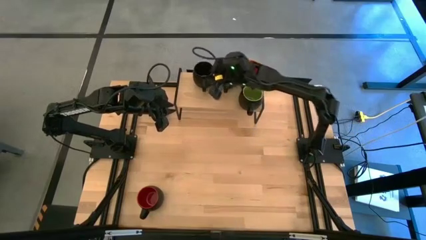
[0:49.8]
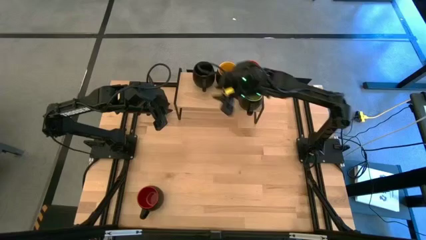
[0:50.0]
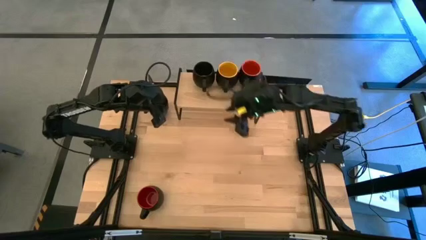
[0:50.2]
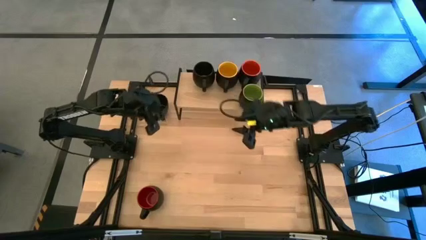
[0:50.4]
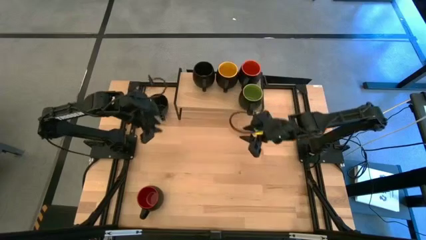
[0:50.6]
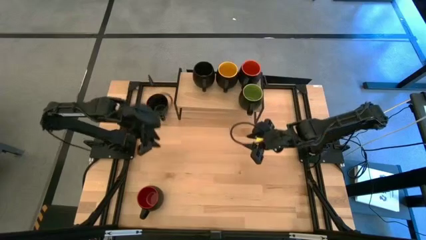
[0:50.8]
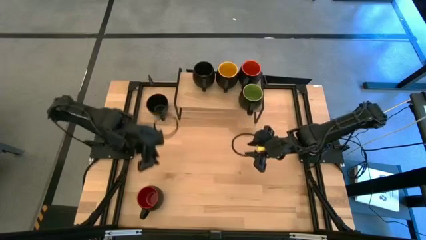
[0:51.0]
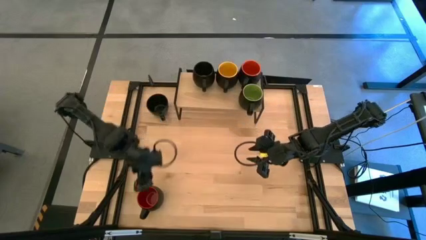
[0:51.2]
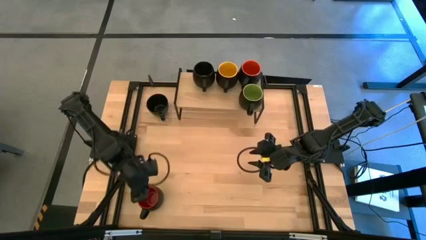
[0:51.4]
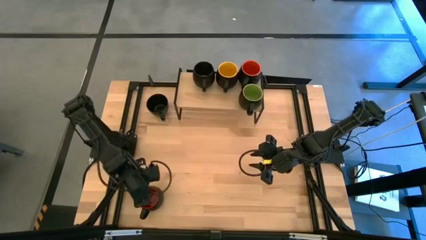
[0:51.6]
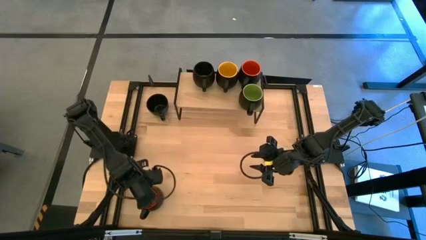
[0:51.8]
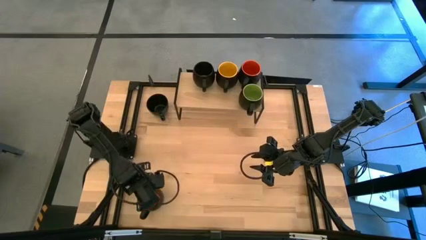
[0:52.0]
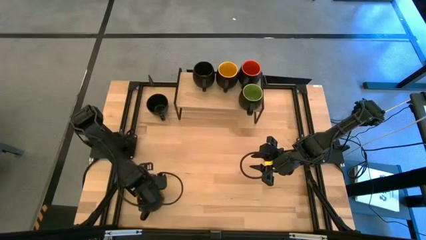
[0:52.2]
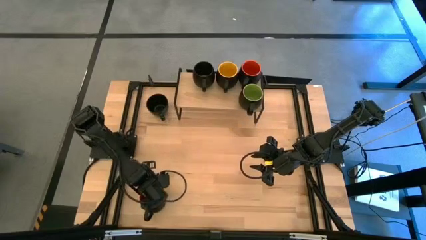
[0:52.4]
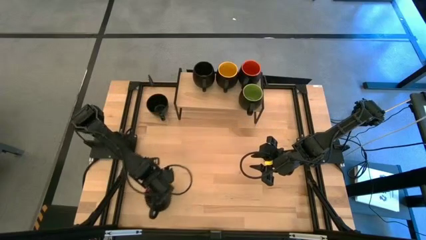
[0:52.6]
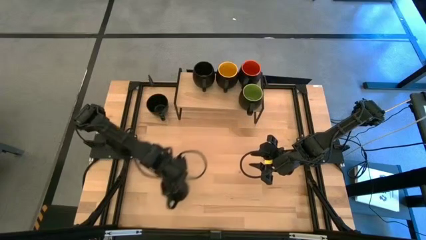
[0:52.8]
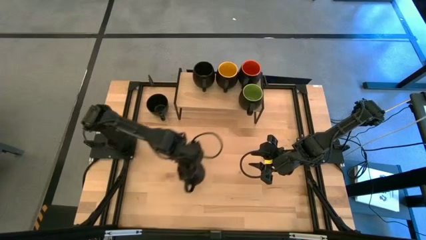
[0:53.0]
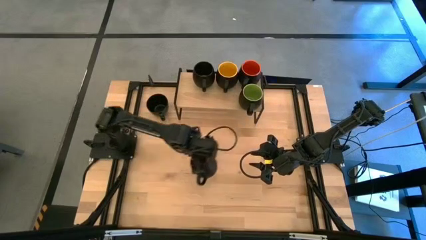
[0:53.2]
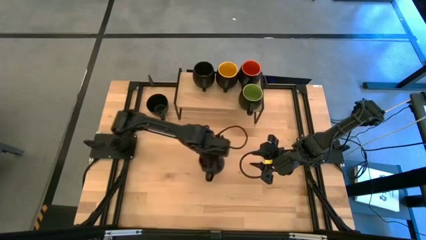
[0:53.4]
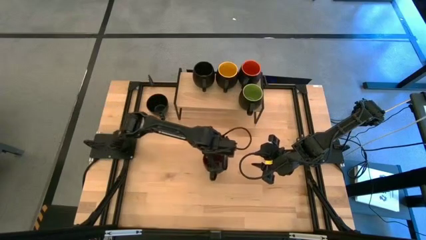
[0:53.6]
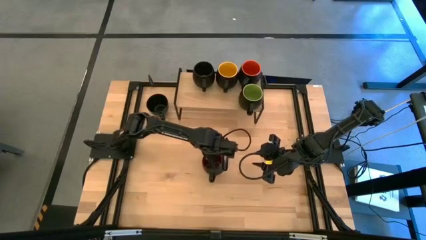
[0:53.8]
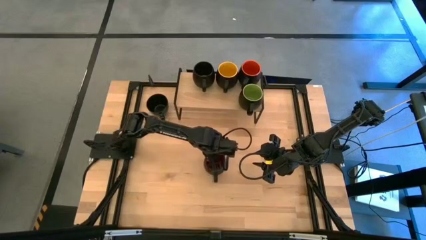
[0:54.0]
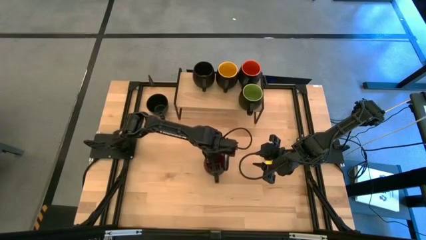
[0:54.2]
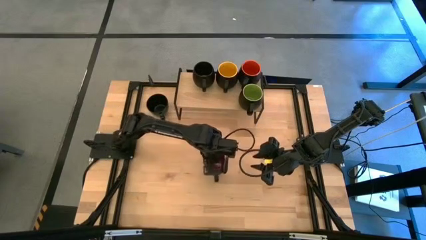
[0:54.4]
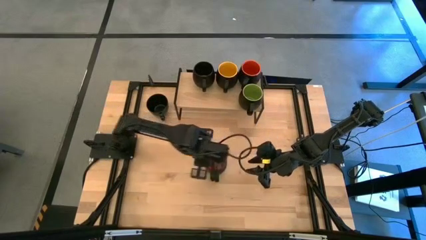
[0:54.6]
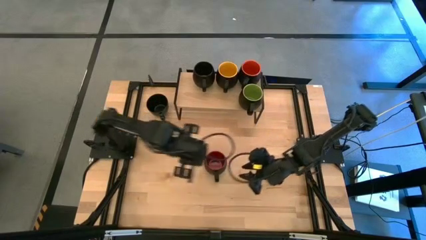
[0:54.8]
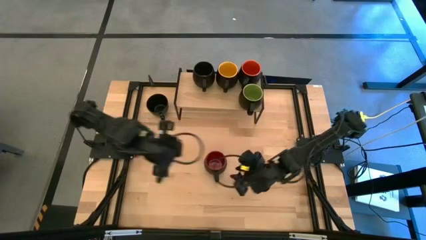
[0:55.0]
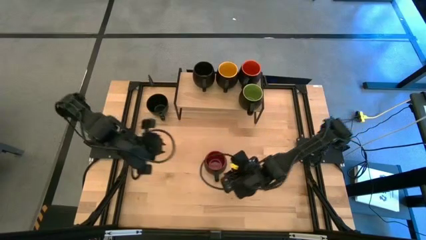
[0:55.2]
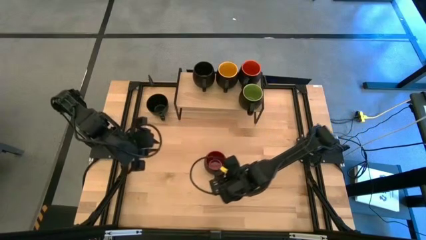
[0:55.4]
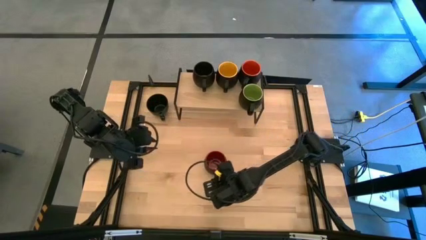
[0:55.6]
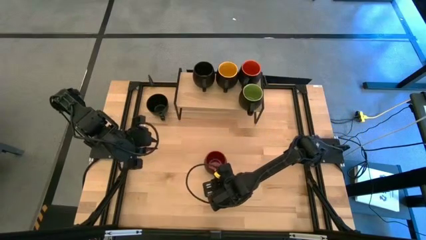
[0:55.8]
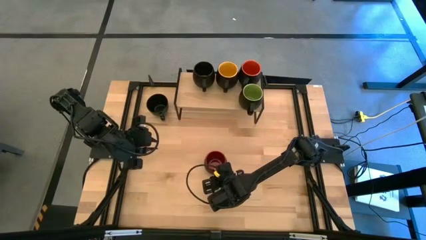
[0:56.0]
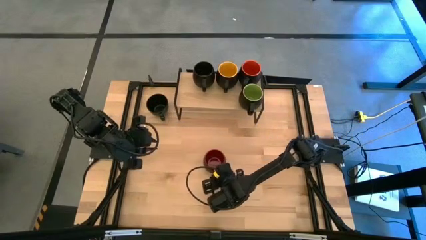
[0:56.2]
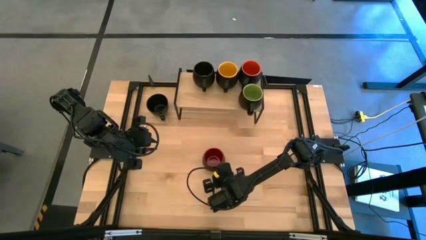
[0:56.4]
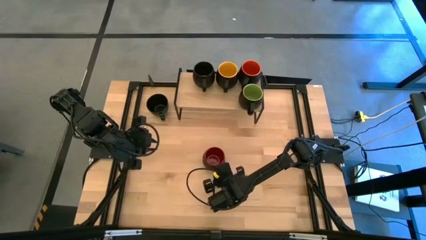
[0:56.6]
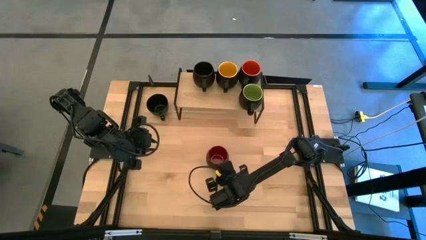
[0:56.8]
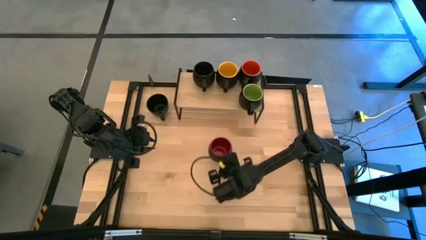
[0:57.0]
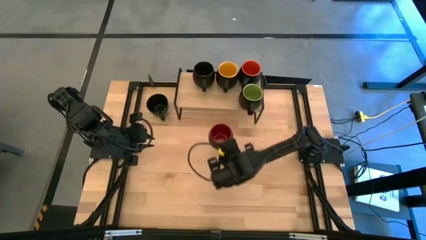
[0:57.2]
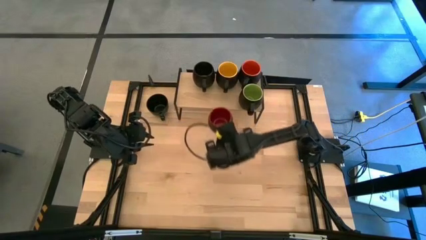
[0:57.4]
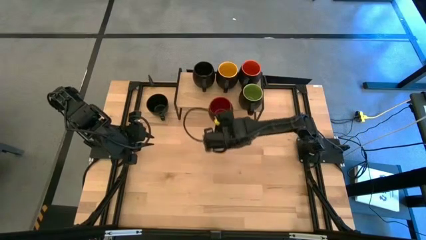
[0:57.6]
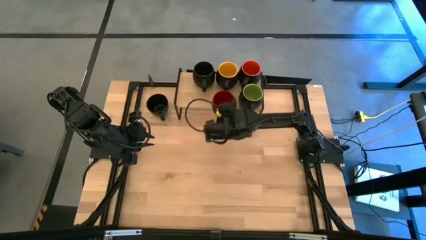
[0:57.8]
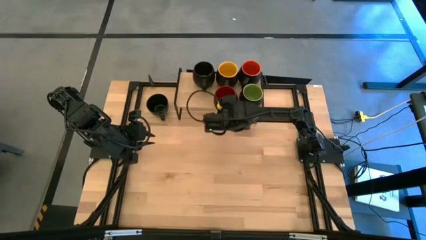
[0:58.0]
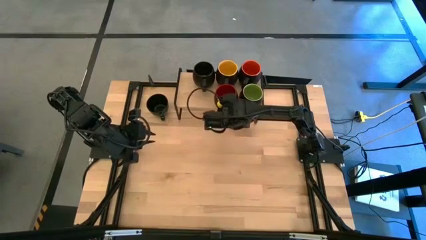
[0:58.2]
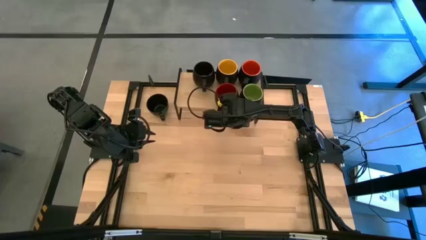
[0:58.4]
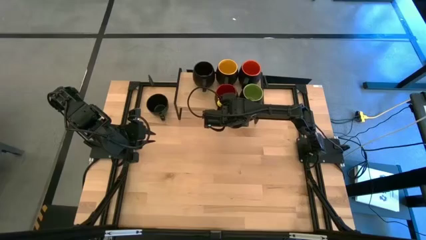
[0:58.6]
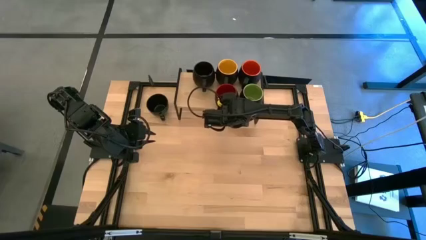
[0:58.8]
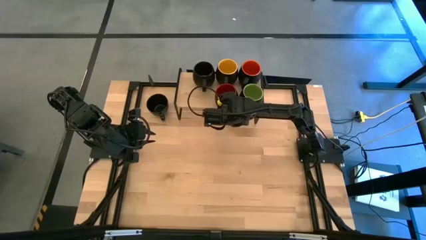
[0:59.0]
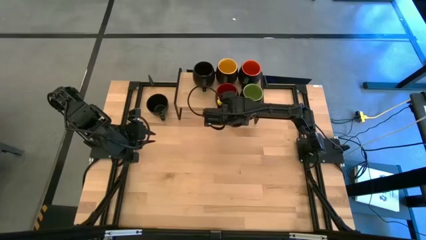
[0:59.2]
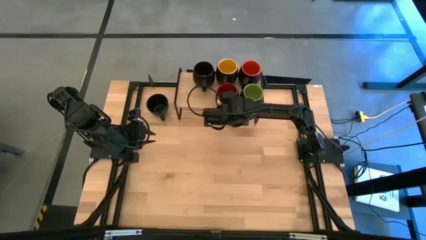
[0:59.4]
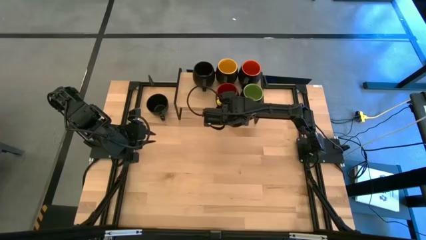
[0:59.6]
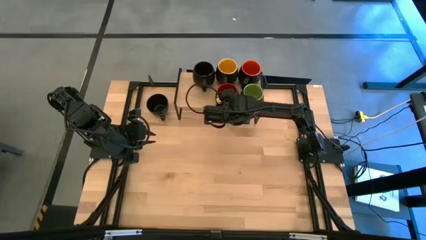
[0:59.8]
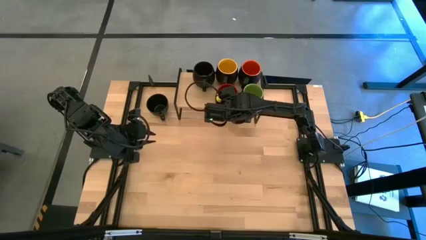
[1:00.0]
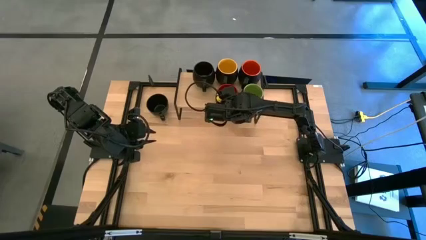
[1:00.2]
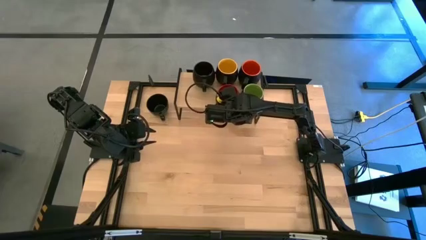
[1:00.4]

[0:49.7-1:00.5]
Task: Place coffee mugs
Put the red cup on the shelf aligned with the other yellow cup

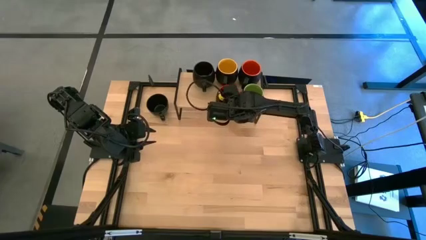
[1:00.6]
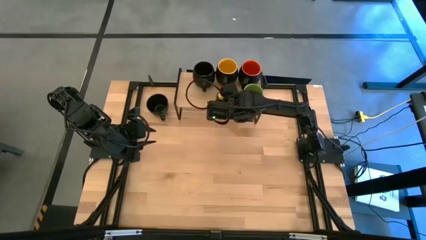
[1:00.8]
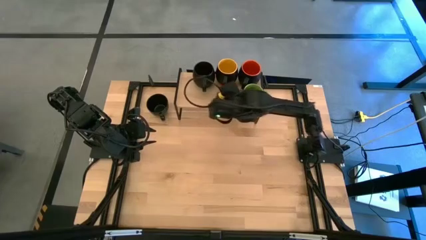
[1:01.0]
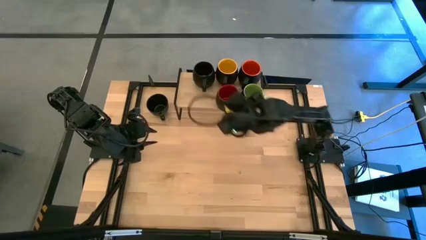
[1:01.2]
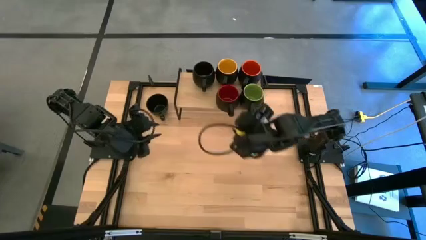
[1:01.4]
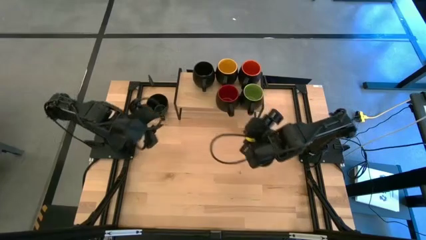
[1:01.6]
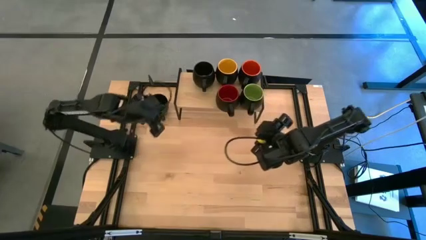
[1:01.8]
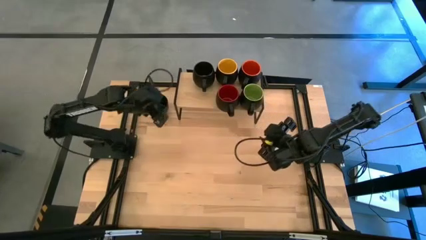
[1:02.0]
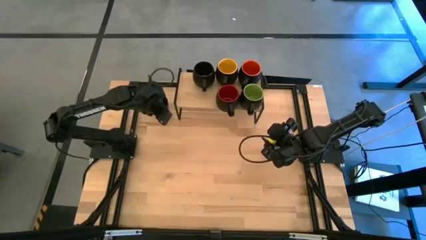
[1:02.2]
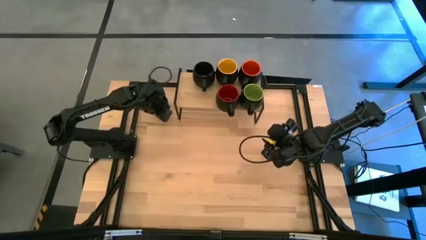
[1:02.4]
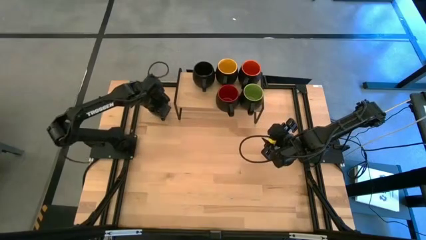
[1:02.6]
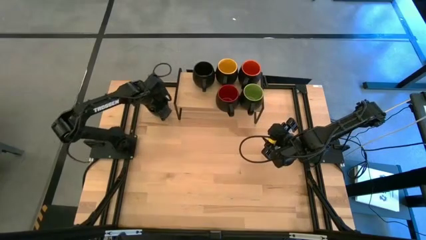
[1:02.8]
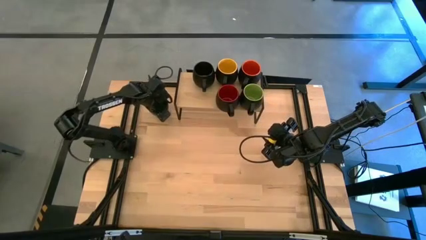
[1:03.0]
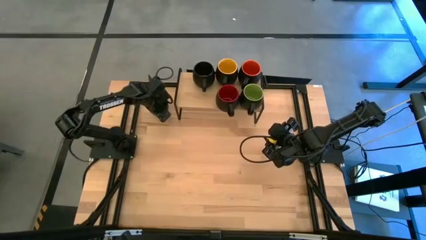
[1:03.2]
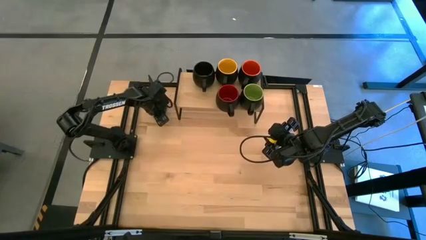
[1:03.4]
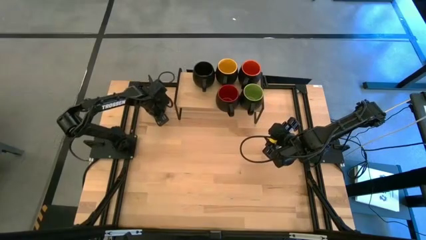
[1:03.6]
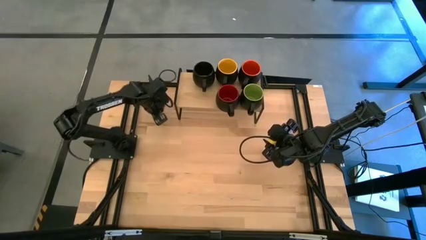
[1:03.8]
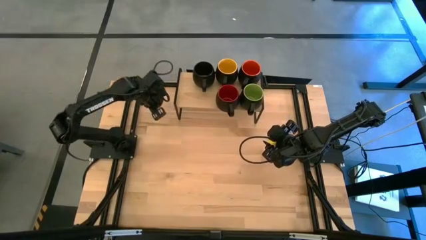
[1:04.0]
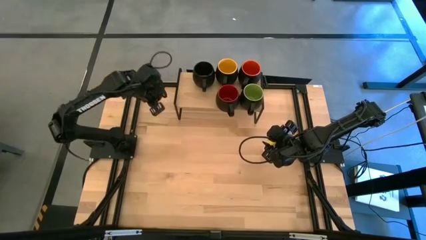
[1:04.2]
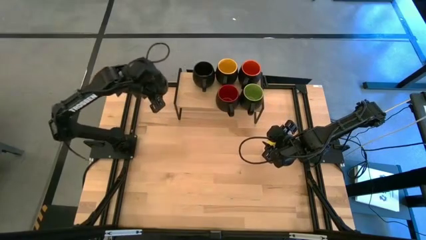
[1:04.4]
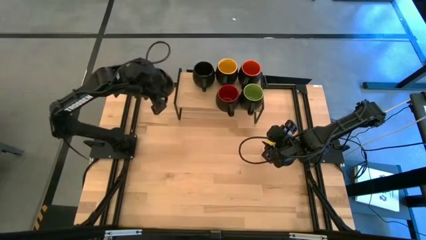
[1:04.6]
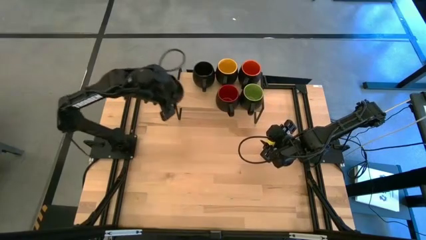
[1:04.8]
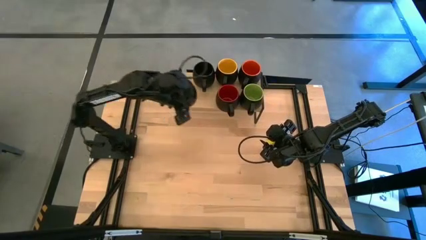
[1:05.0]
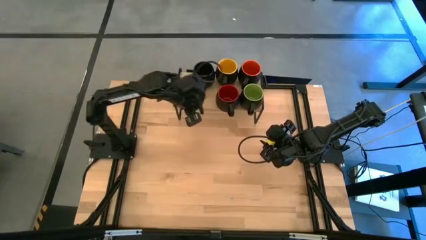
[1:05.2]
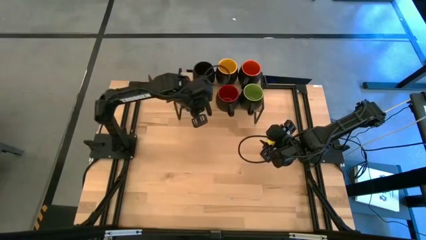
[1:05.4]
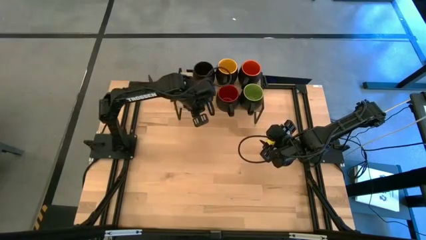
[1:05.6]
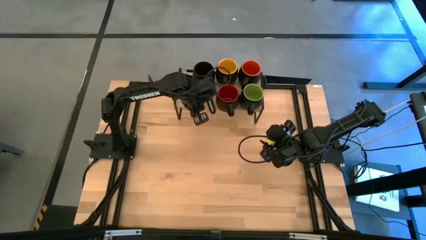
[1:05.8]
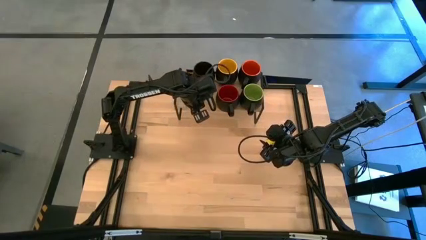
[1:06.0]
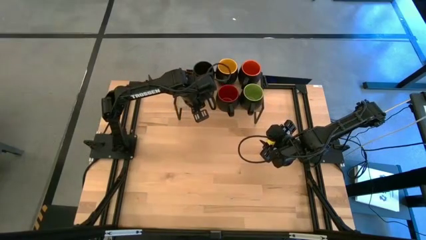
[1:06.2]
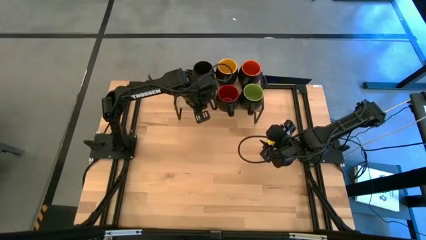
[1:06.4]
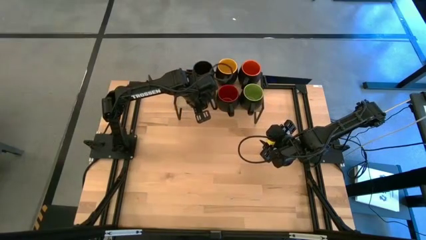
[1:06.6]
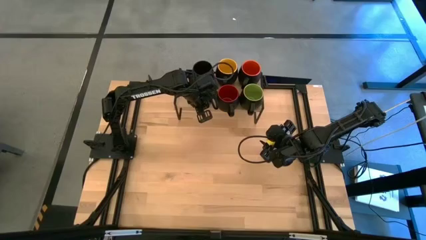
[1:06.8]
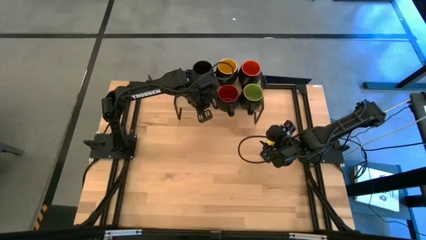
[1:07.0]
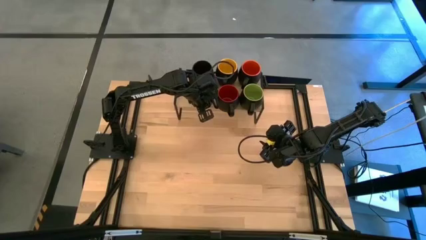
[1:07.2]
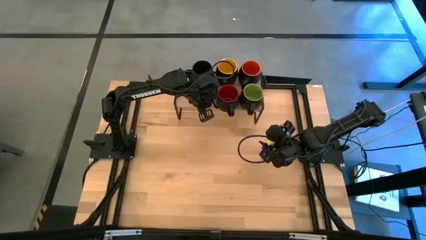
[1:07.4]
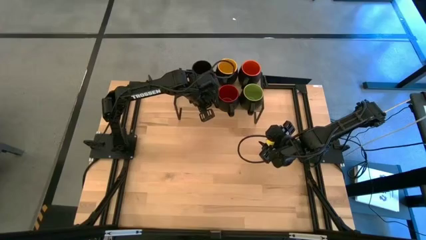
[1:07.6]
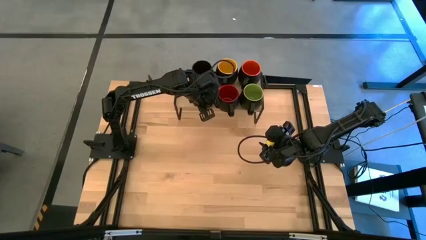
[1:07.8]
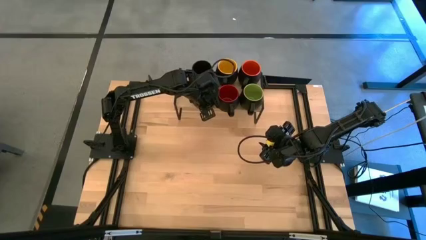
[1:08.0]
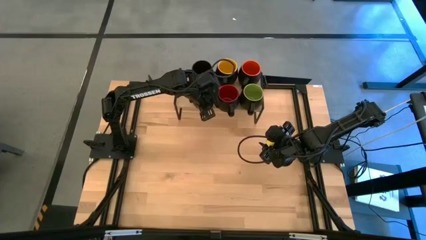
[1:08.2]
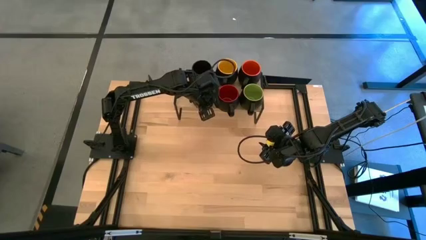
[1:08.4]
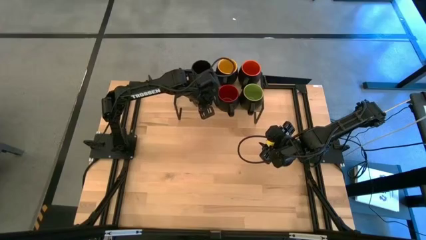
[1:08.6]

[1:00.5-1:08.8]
Put the black cup on the shelf aligned with the other black cup
